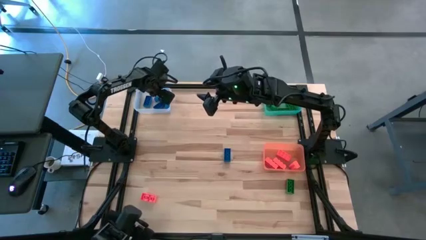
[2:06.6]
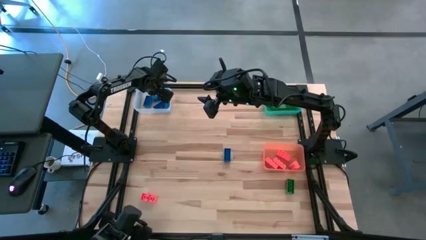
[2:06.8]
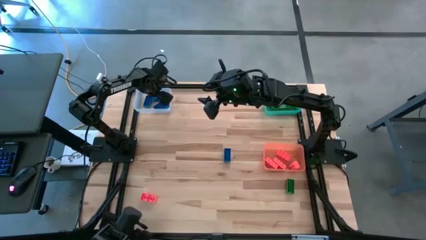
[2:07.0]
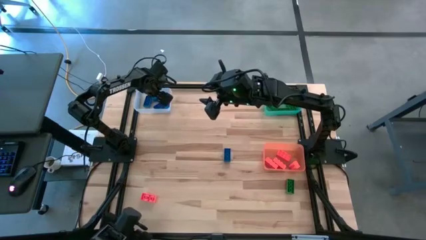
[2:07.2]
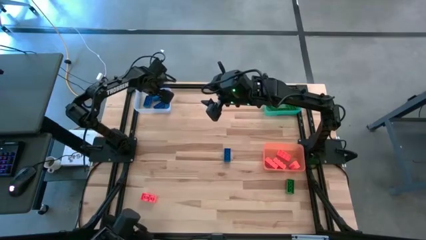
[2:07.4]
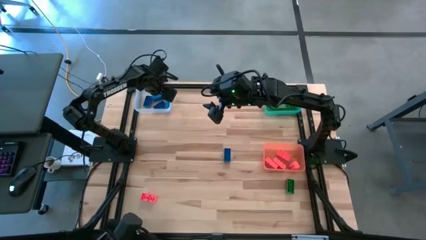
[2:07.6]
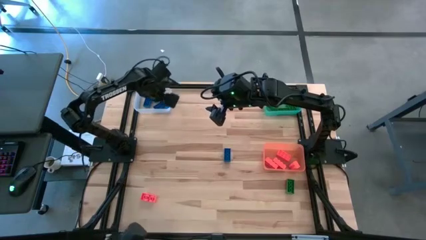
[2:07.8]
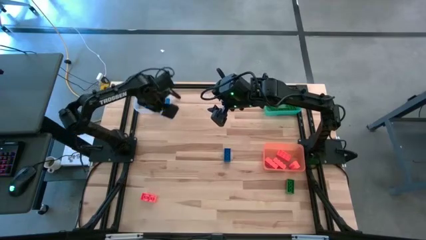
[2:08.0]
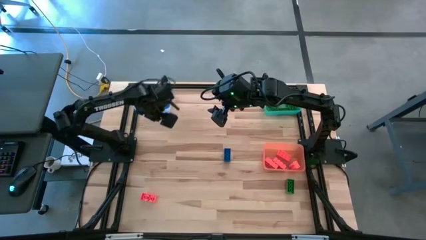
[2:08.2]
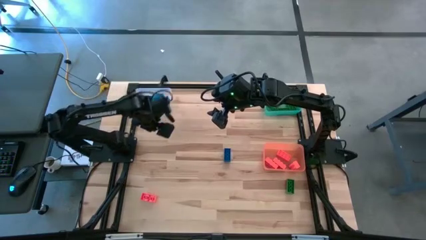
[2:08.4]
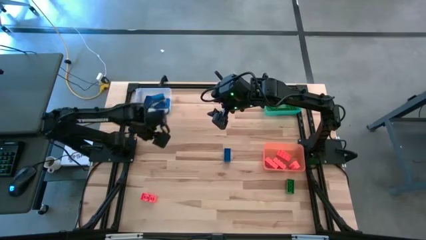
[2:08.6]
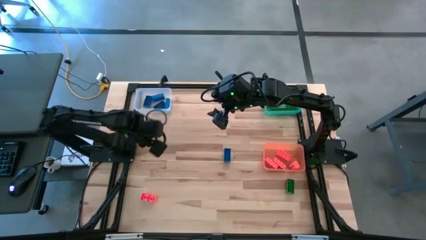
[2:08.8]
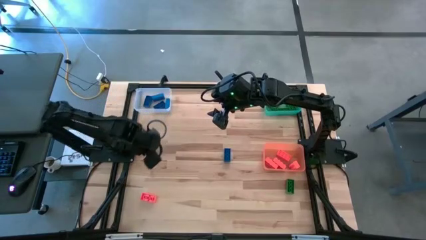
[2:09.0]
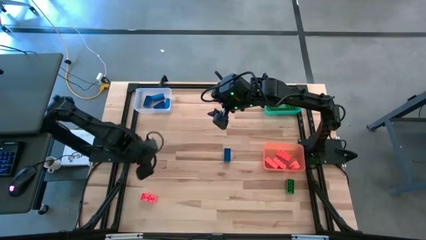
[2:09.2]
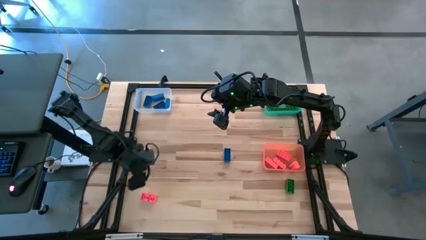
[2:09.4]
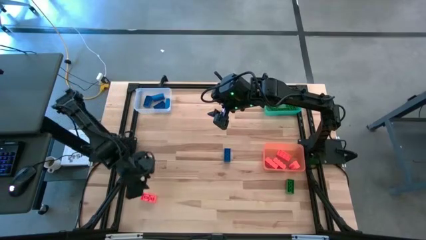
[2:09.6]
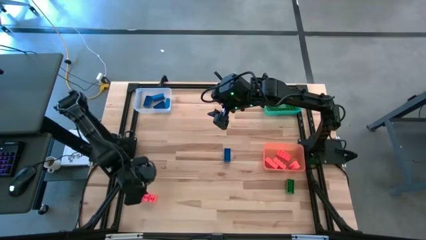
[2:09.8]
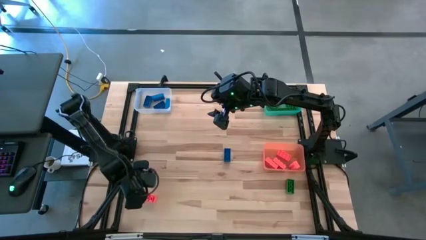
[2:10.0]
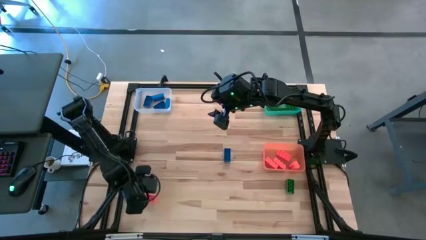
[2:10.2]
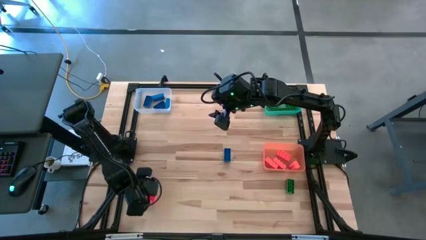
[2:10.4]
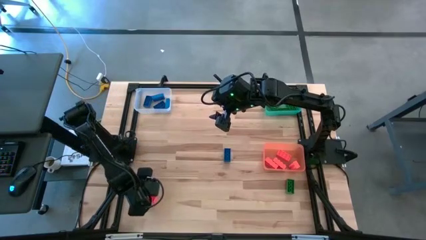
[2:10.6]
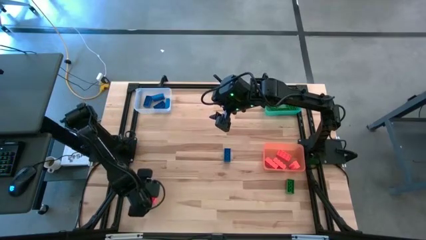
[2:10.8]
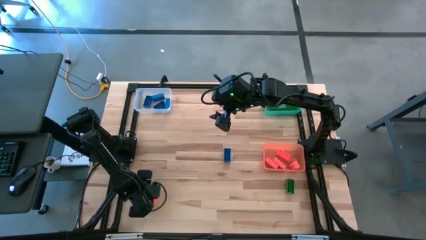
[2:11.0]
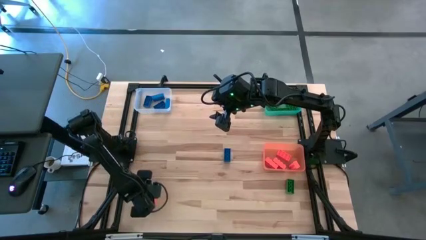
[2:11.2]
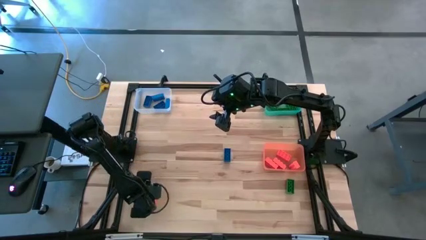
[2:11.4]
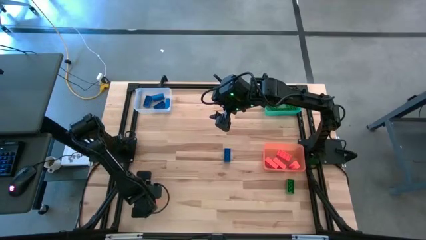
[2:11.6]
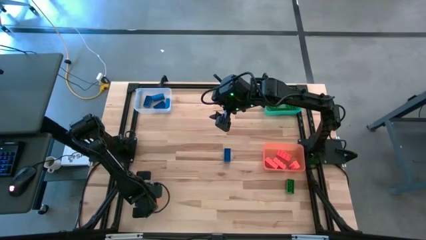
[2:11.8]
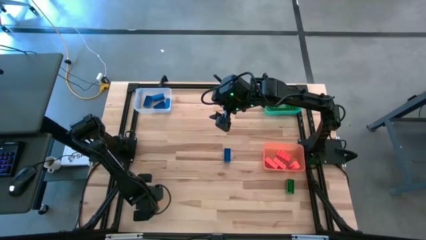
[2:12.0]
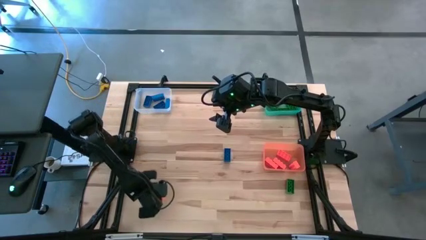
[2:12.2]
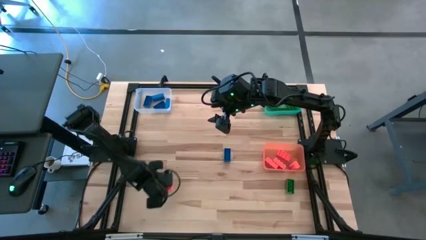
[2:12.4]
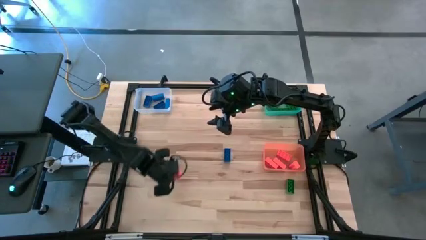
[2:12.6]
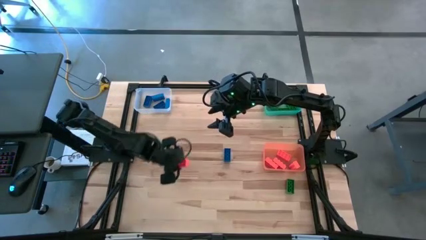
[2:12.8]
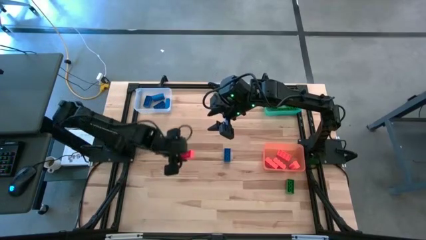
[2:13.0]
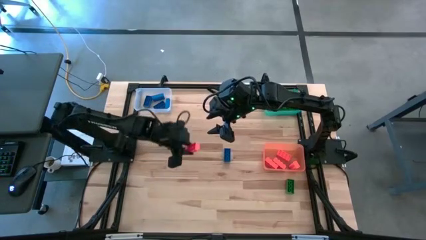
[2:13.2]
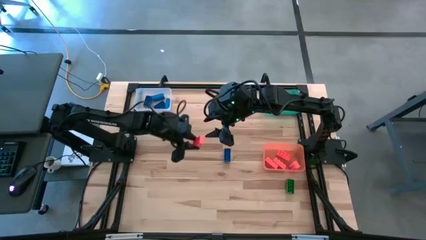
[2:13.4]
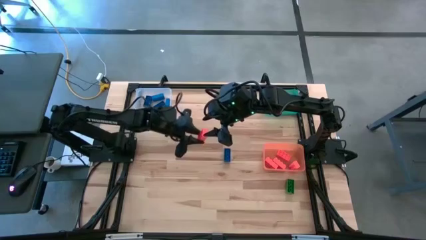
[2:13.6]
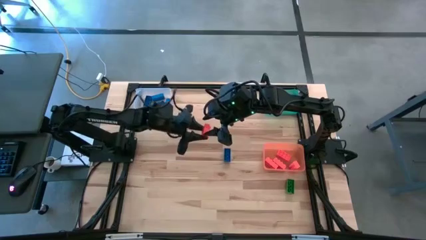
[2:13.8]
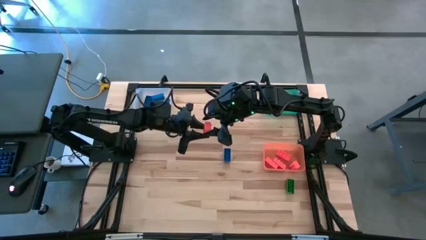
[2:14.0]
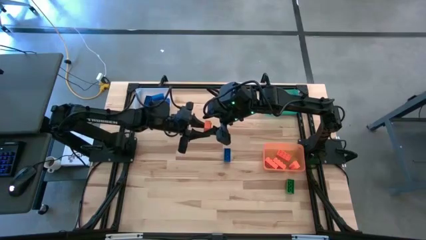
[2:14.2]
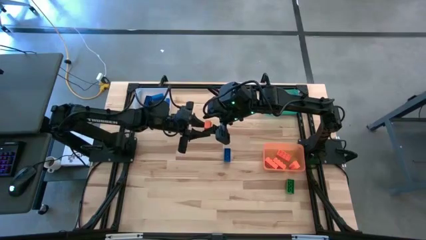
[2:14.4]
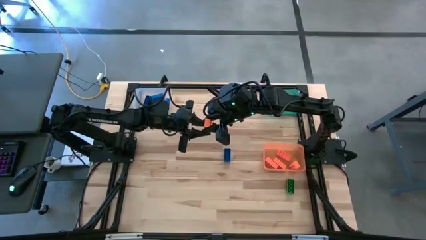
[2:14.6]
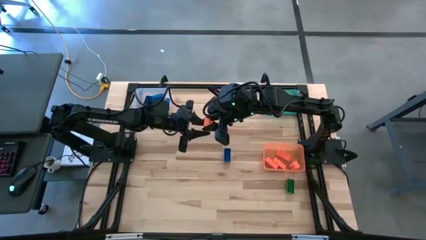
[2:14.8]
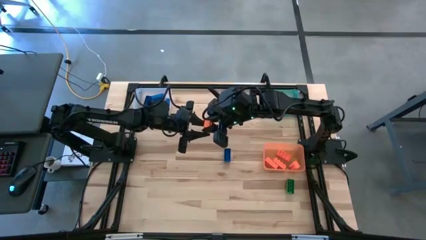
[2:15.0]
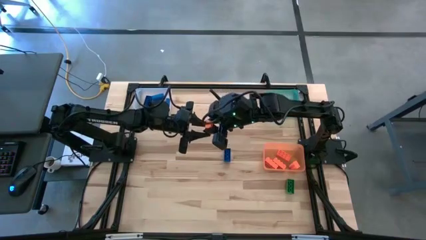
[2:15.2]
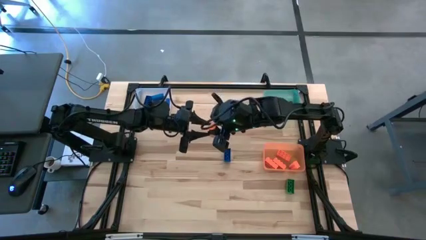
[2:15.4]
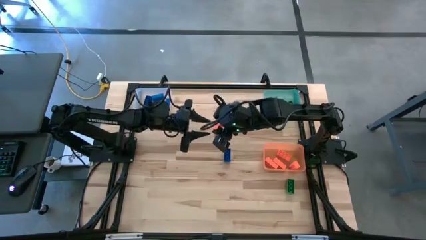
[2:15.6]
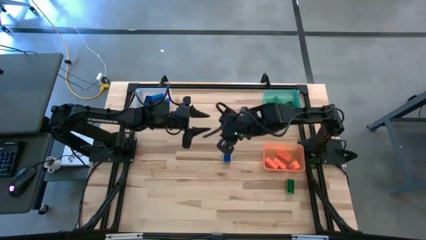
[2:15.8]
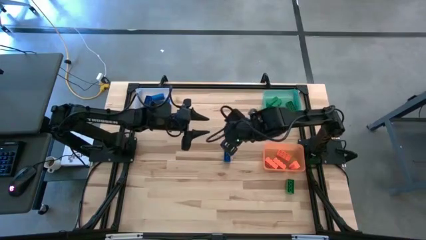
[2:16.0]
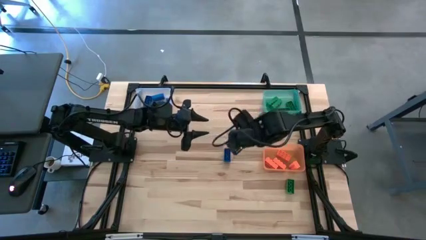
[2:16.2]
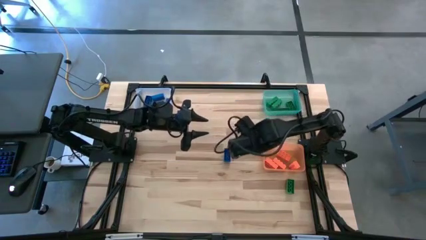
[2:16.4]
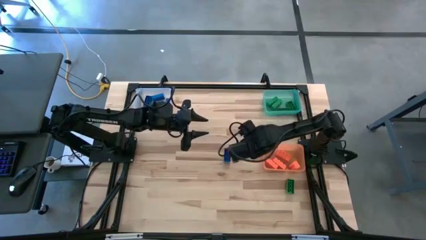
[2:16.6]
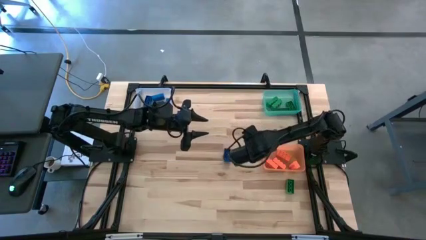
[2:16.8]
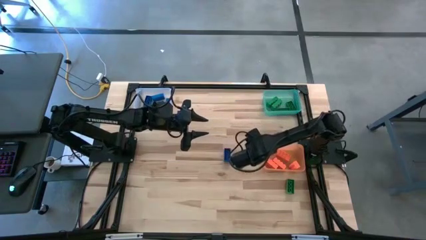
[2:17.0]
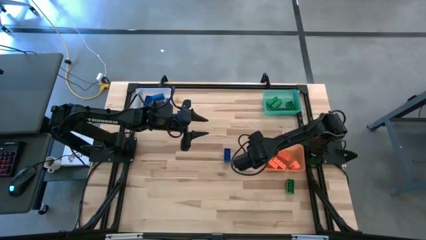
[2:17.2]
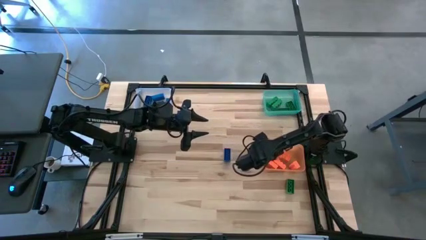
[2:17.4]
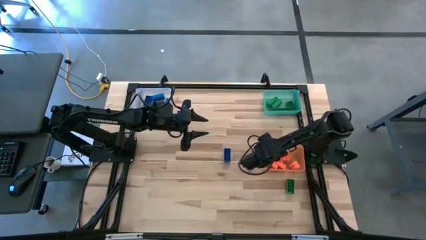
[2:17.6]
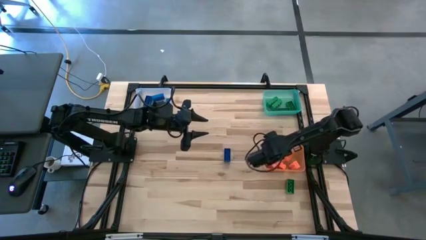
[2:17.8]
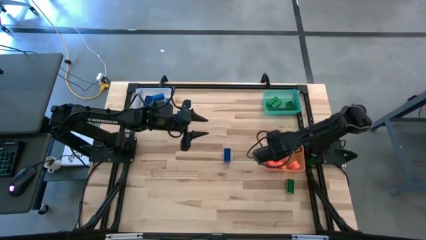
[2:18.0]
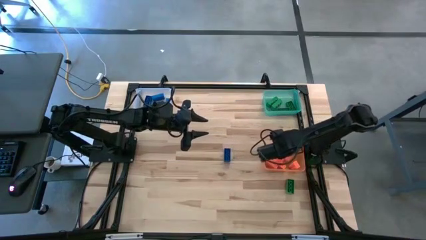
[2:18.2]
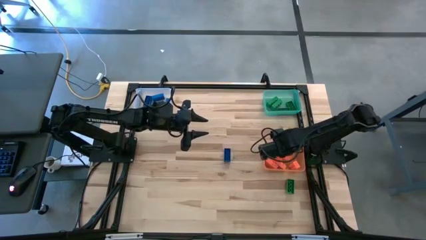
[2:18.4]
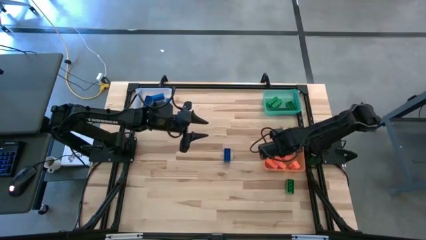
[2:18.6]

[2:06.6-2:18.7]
Task: Sort & place blocks by color
Put the orange game piece into the orange bin

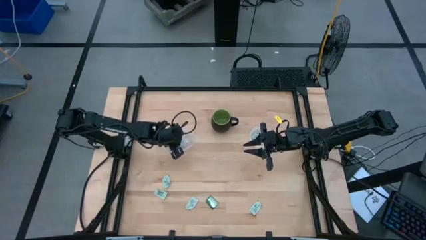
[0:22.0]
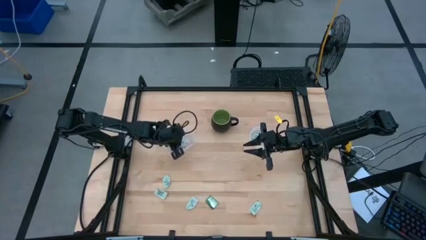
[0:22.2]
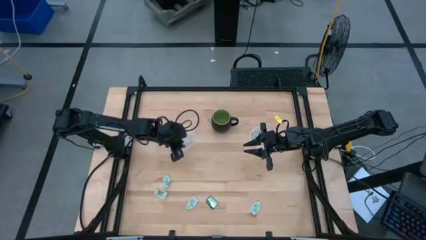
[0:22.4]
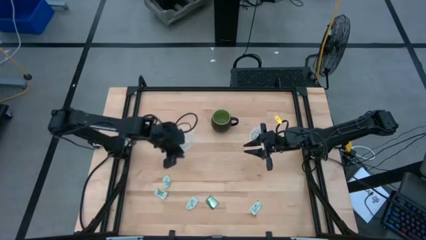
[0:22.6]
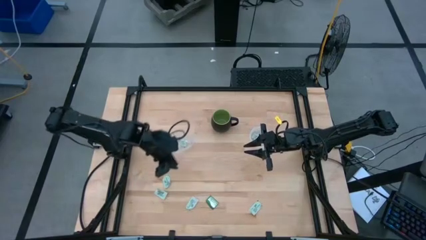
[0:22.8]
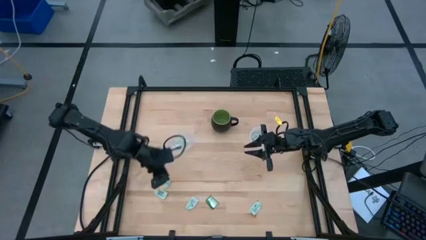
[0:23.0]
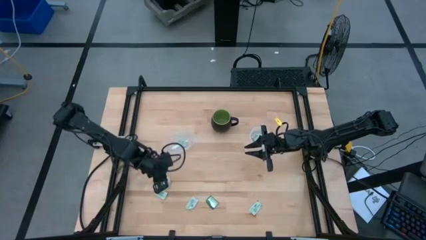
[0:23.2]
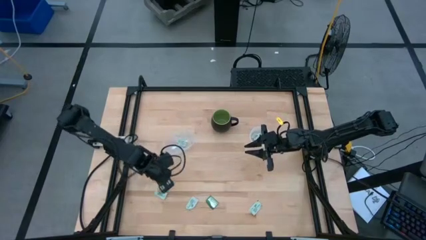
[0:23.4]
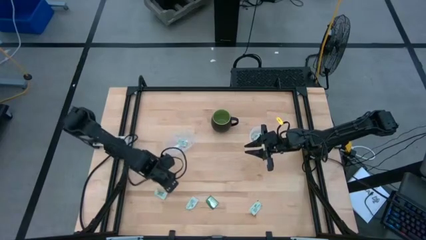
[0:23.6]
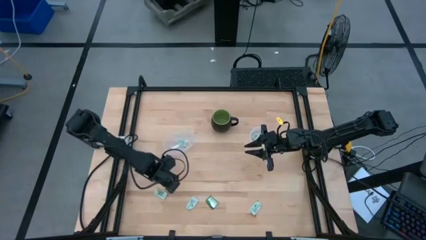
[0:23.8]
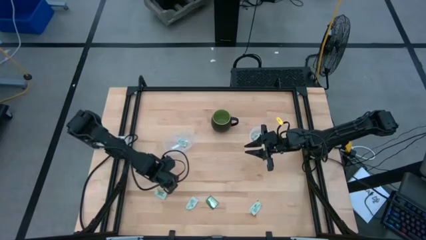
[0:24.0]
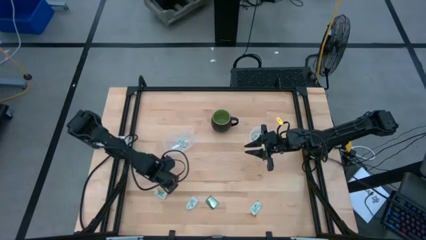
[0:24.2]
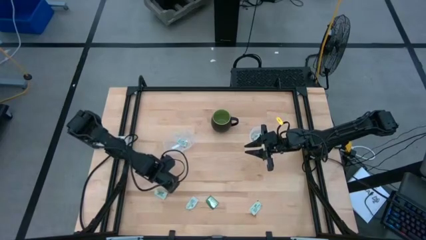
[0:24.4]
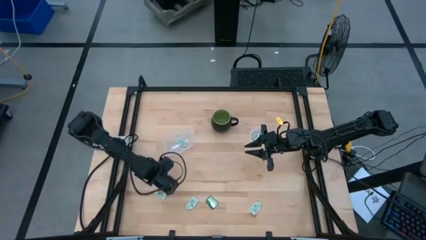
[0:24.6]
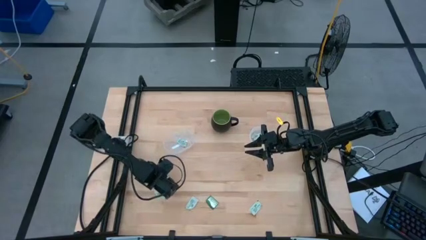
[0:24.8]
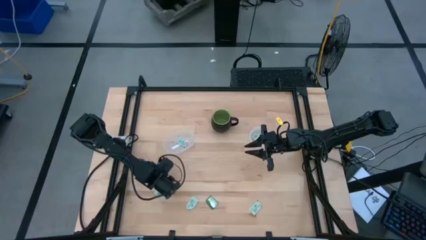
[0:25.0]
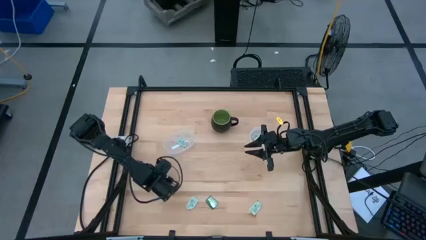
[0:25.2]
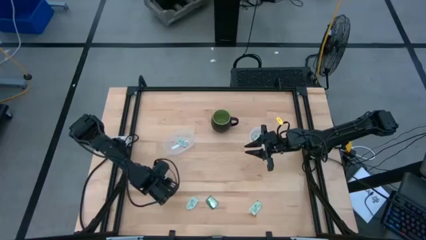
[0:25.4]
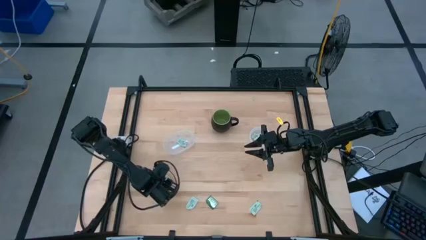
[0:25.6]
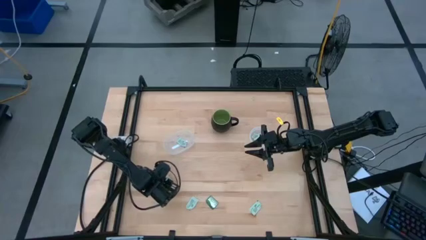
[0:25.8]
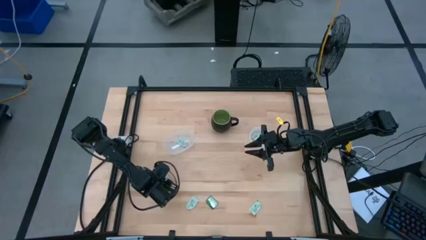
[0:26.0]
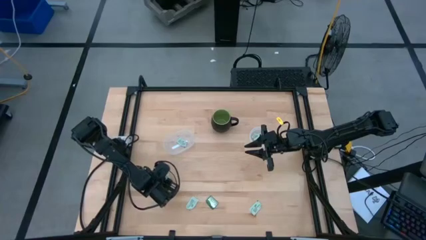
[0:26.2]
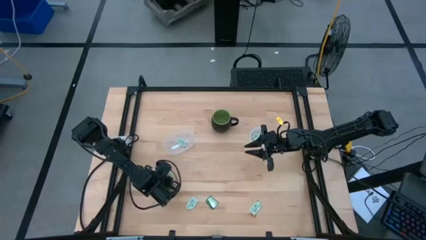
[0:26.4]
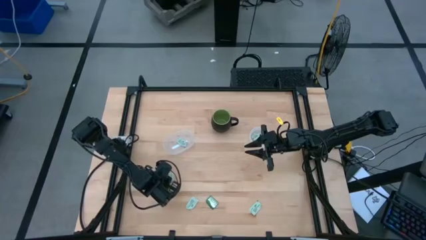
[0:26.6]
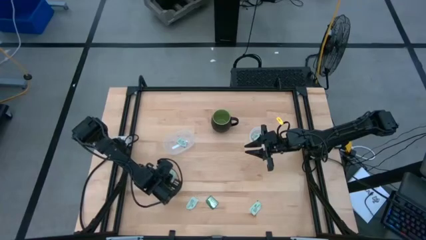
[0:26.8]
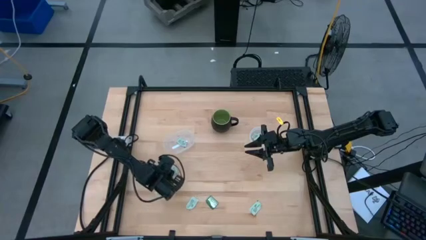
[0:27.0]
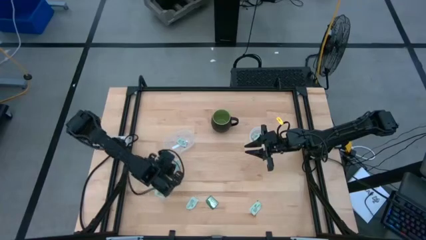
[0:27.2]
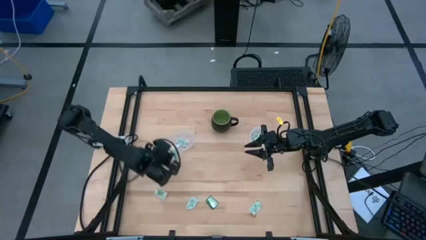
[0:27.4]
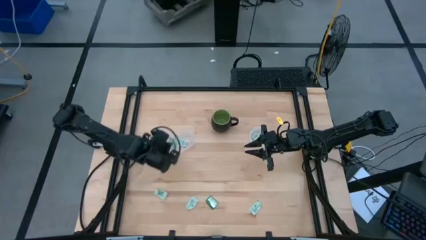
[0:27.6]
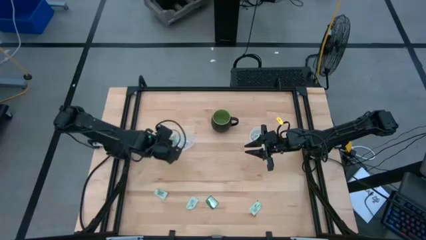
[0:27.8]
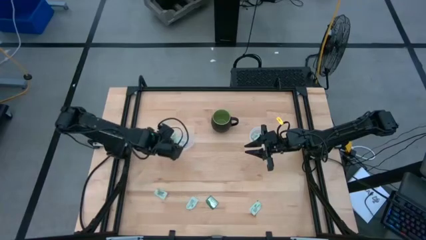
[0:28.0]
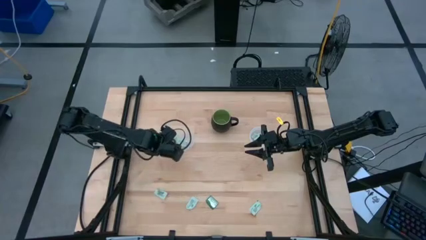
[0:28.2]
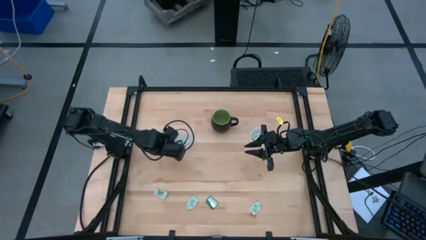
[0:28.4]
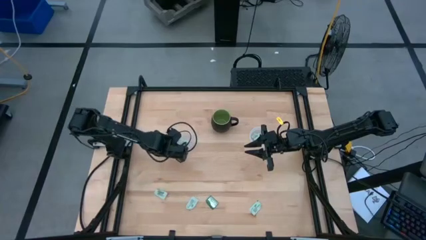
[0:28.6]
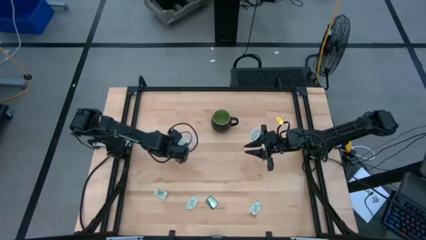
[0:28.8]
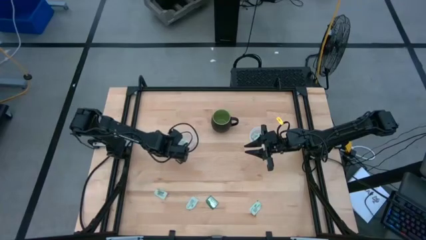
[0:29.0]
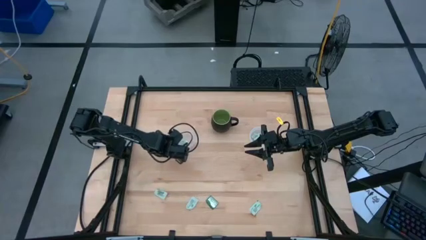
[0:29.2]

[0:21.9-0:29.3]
Task: Pick and place Stevia / Truvia into bins
Put the green stevia packet into the left transparent container
